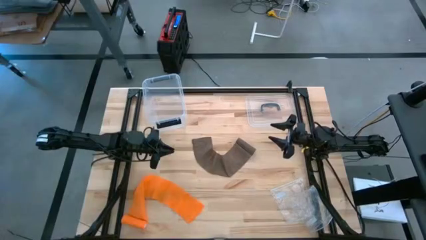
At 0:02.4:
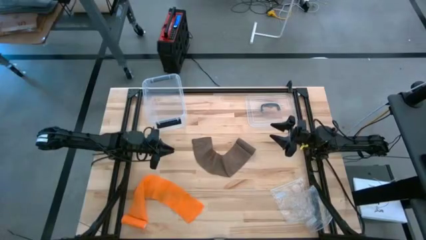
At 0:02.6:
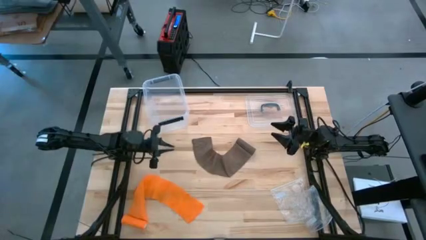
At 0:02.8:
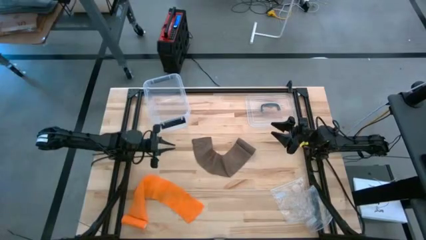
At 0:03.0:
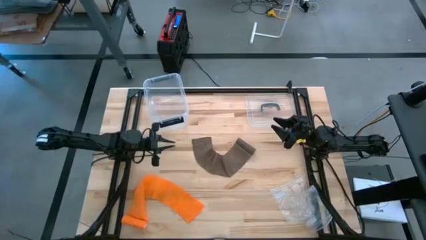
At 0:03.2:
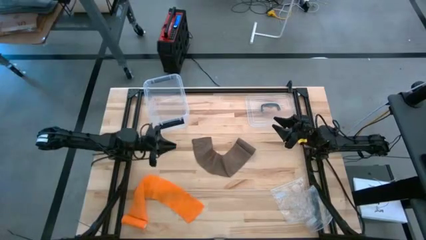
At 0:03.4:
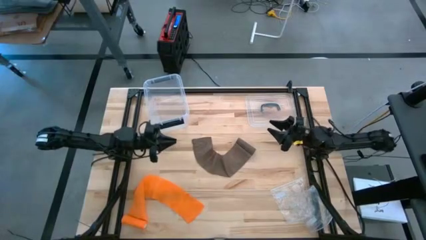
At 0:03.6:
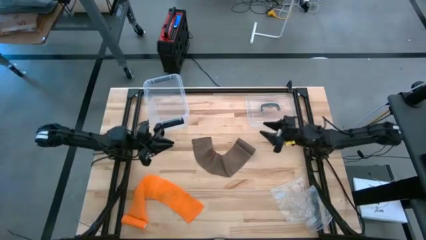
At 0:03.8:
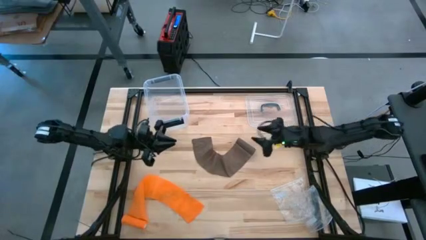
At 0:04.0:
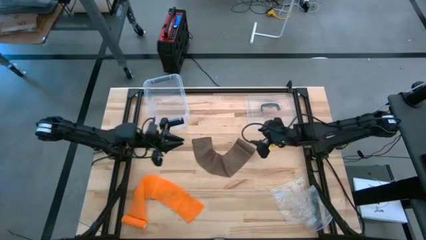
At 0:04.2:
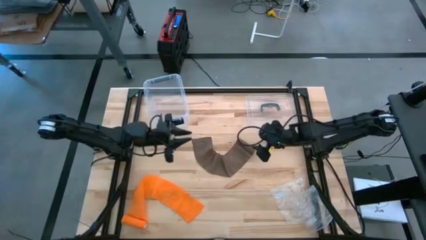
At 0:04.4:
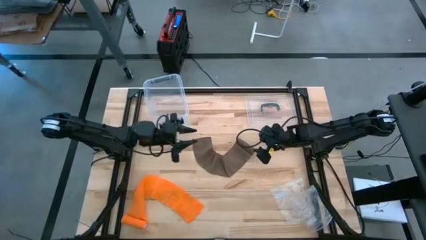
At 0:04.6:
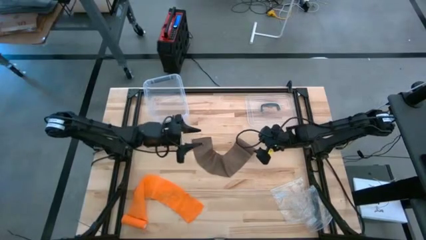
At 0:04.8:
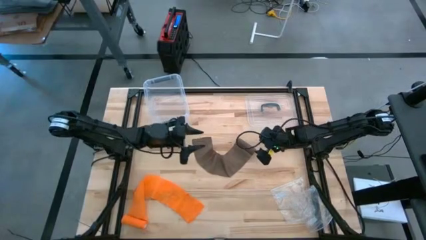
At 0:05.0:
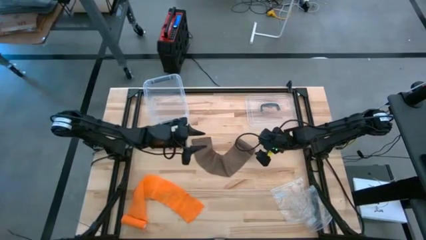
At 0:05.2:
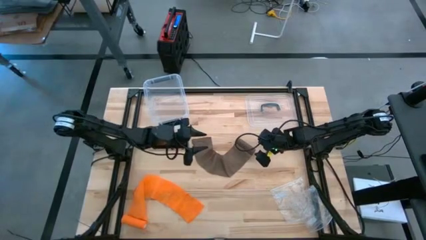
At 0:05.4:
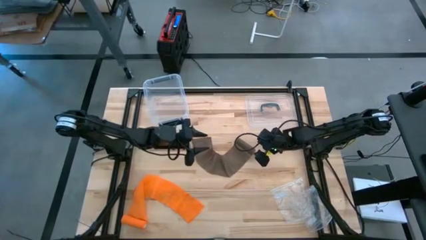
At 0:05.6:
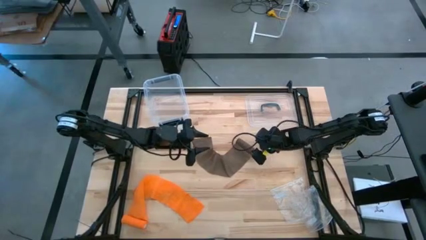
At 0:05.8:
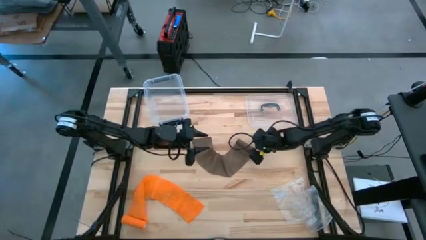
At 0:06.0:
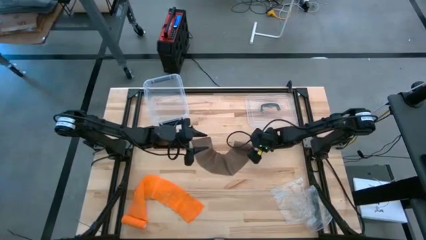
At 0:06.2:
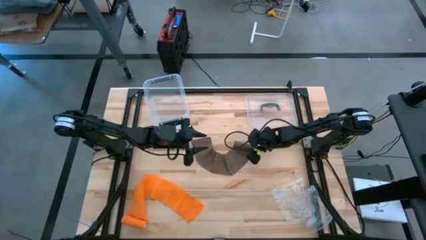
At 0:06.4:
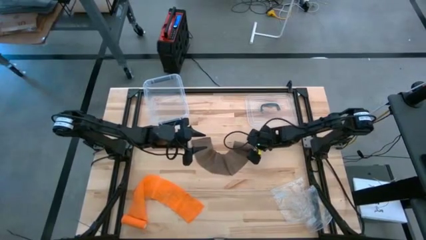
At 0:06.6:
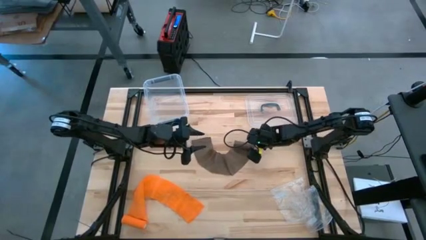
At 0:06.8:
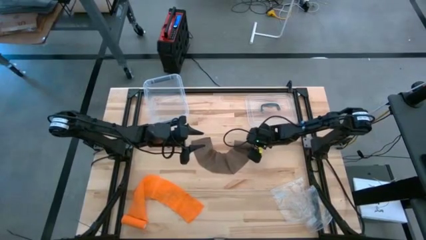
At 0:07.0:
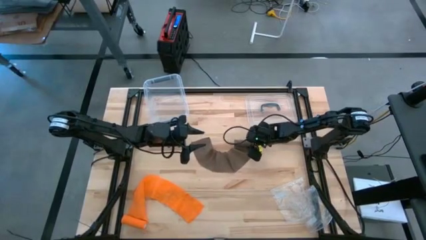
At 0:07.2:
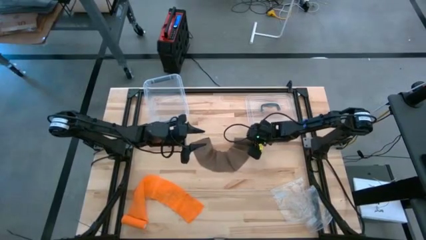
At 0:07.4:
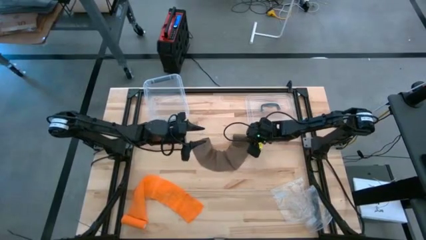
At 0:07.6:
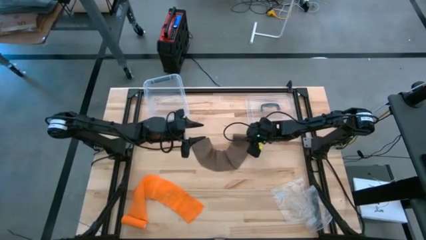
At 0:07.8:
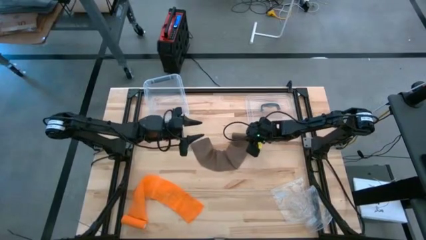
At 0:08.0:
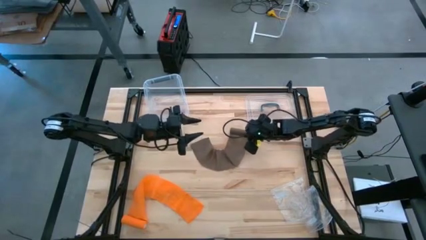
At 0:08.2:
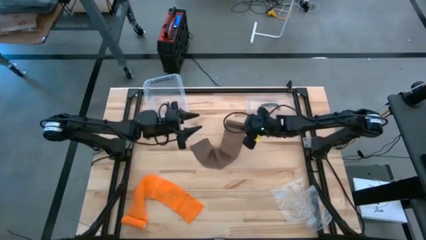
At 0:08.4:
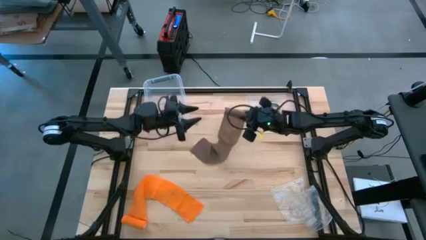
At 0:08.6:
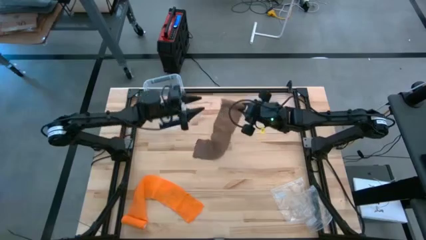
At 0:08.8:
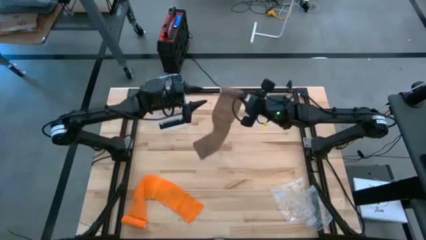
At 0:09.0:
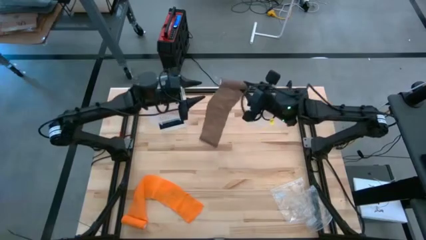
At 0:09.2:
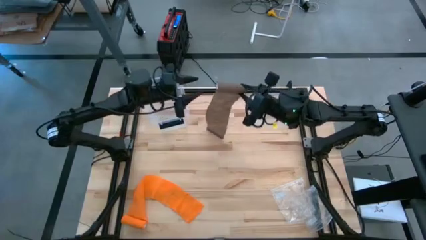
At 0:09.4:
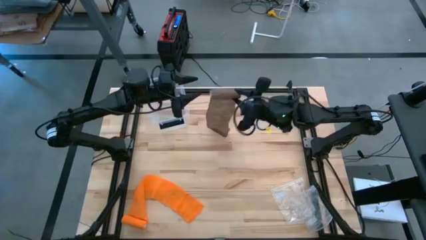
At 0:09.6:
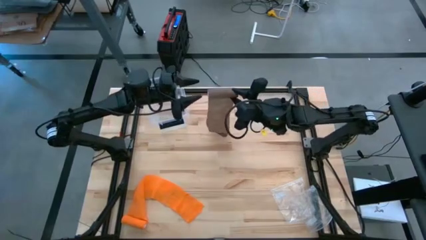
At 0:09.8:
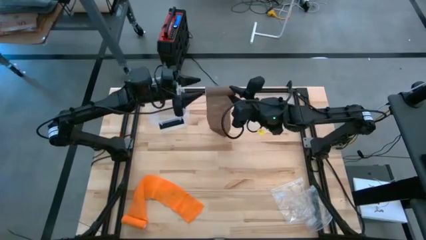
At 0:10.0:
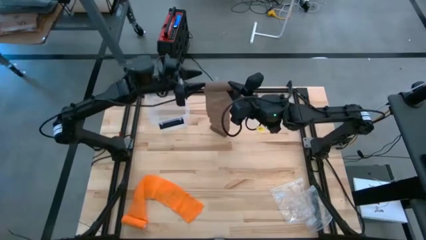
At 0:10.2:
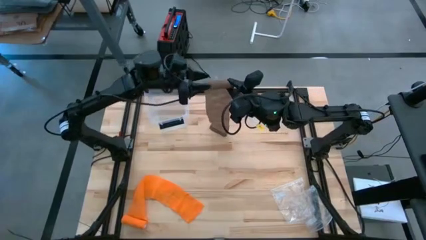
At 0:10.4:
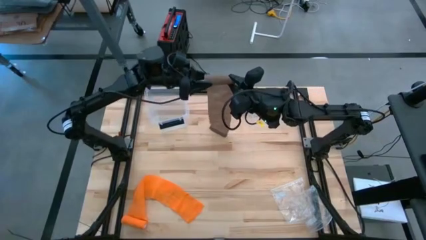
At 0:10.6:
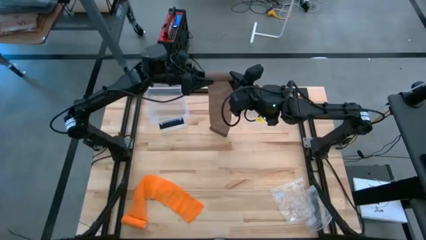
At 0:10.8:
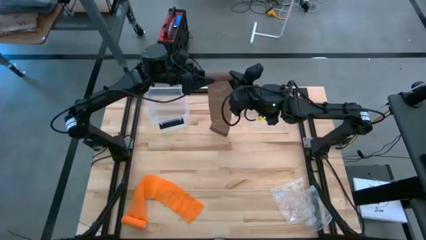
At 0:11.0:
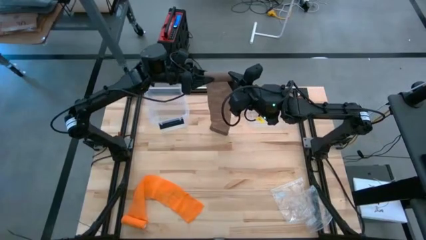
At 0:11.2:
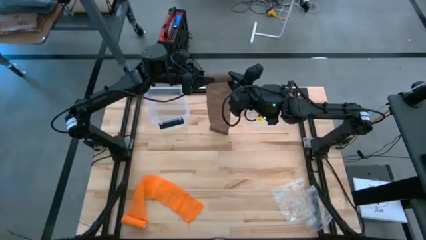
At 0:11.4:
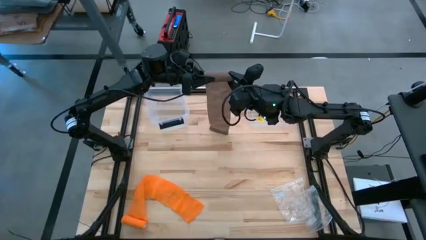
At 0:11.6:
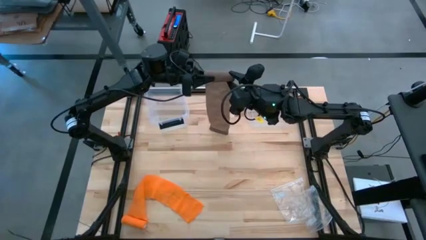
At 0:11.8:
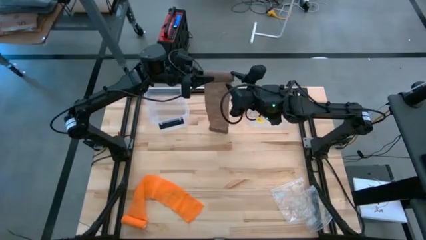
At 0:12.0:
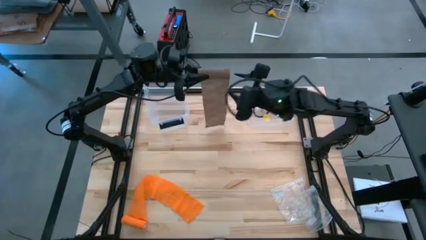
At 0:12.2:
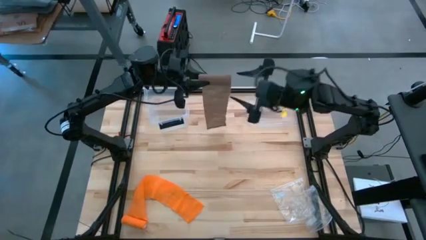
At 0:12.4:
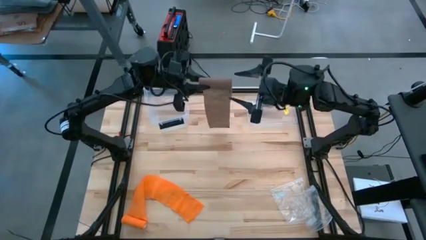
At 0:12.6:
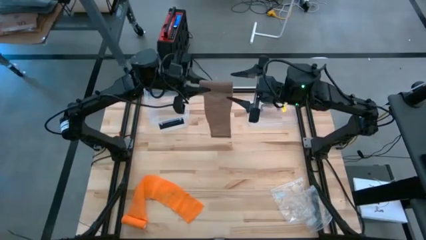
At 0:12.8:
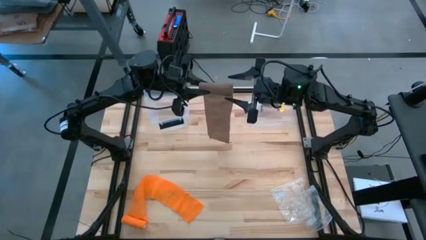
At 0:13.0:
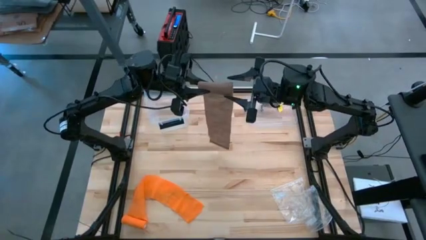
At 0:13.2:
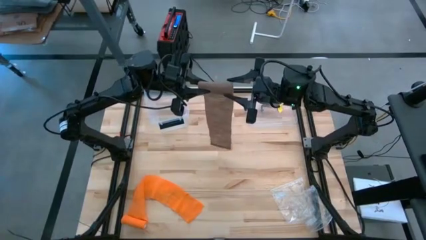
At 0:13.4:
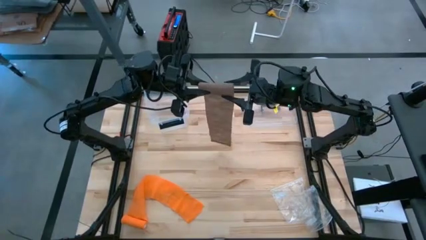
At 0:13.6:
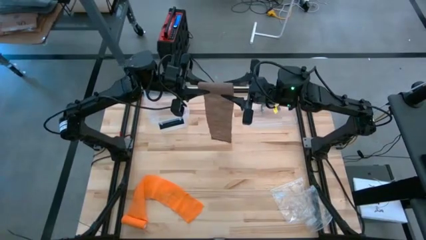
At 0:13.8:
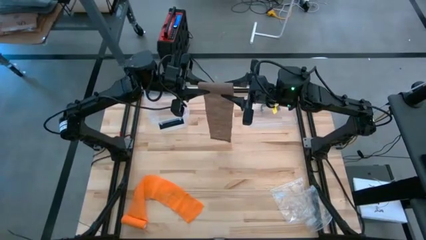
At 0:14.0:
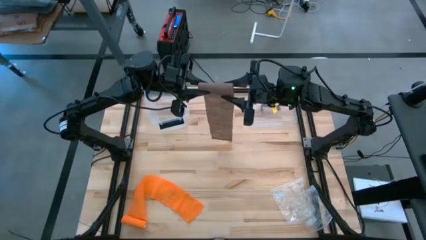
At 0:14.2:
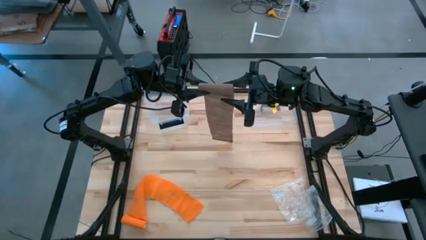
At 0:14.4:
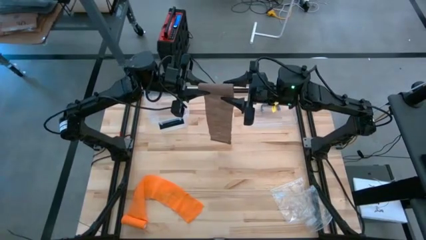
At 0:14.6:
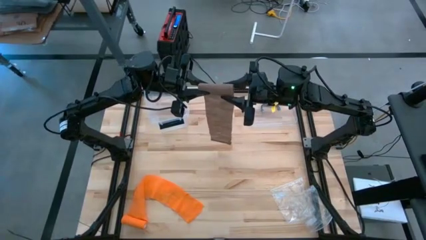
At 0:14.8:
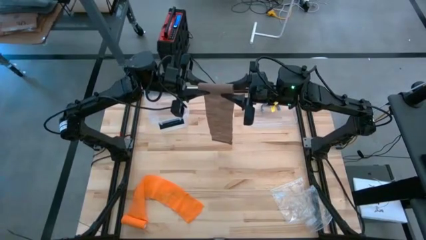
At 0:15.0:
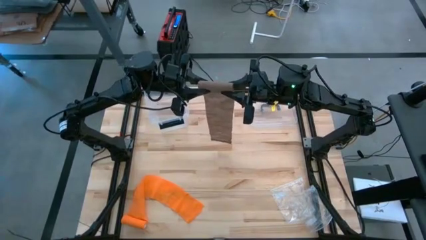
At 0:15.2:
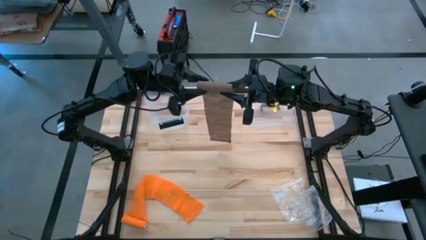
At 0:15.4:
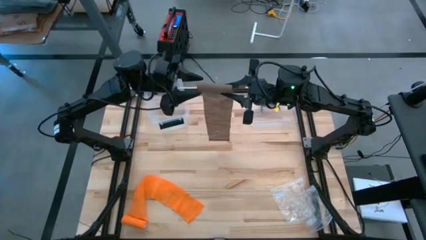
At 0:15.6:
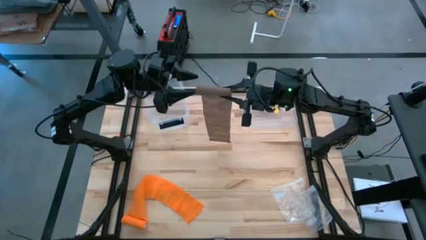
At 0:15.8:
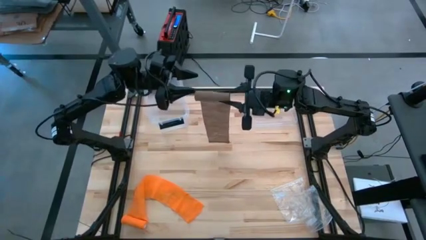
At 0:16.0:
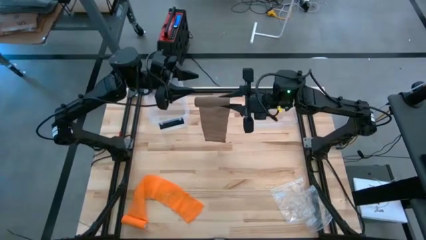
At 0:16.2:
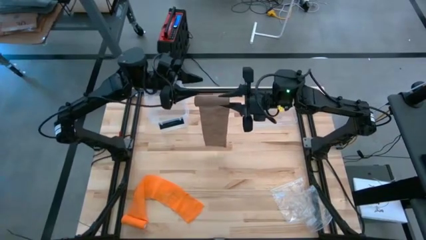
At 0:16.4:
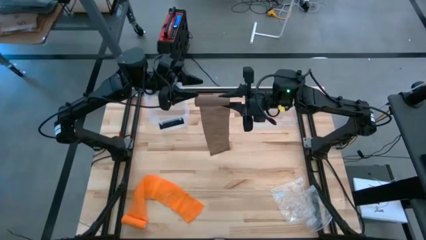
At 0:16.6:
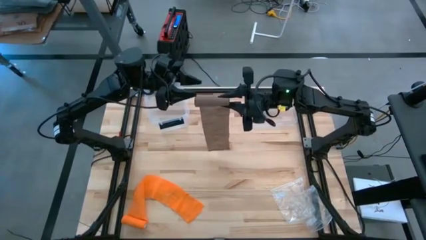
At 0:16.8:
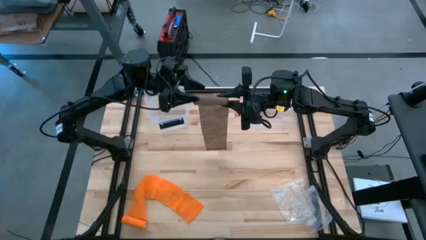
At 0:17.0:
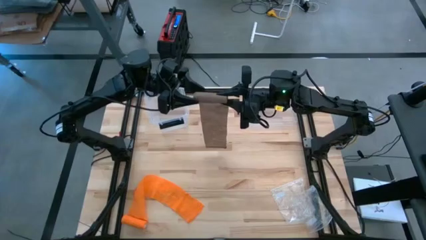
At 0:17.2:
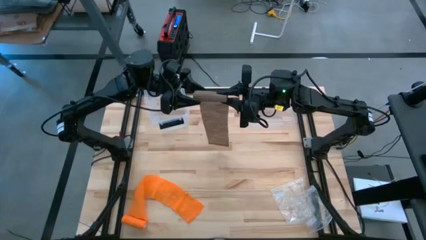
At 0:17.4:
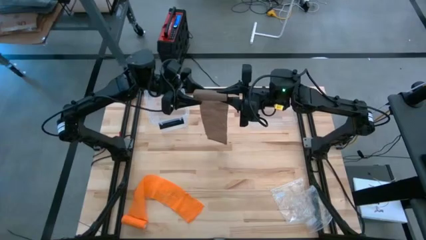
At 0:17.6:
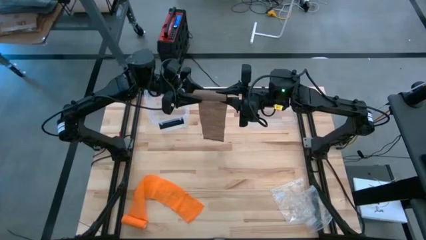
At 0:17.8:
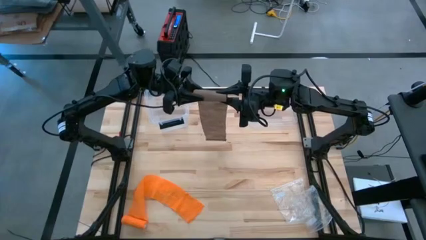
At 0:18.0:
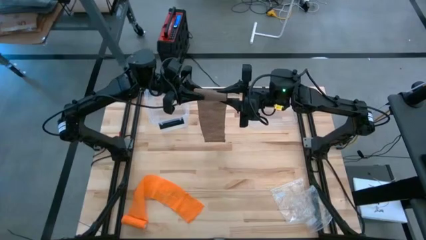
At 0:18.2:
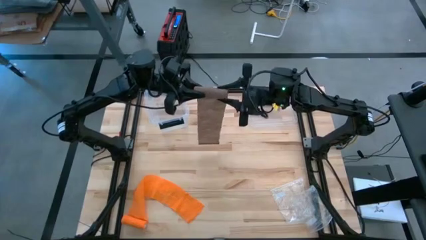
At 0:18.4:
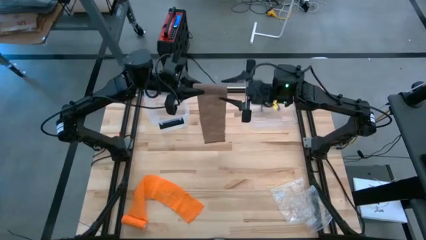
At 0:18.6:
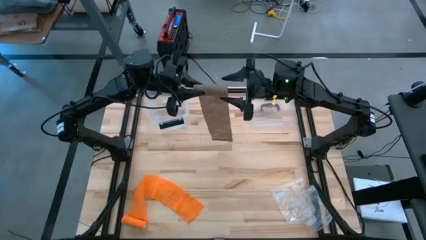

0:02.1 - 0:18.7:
Task: Roll bandage
Roll the brown bandage
